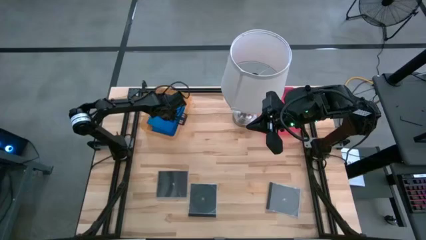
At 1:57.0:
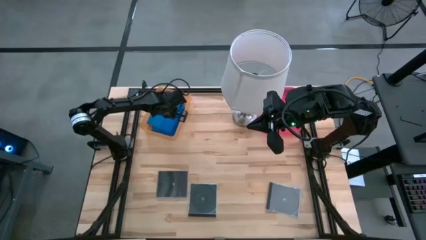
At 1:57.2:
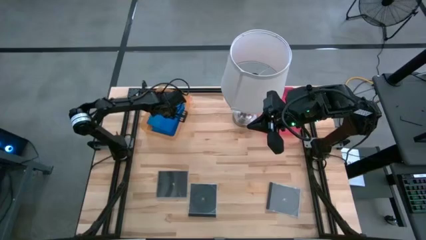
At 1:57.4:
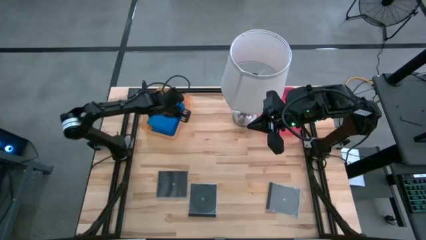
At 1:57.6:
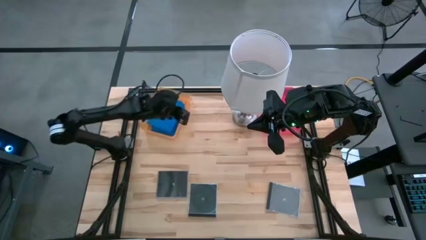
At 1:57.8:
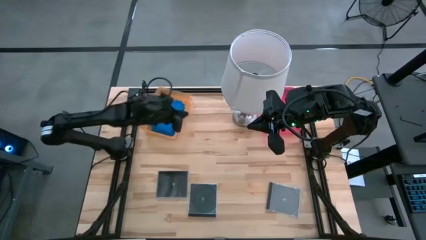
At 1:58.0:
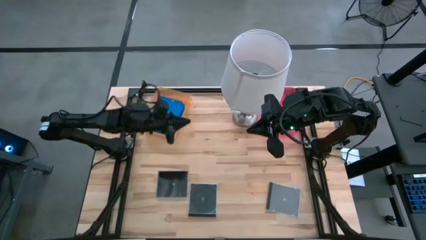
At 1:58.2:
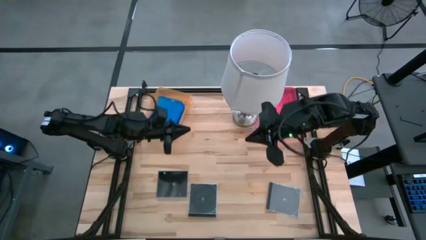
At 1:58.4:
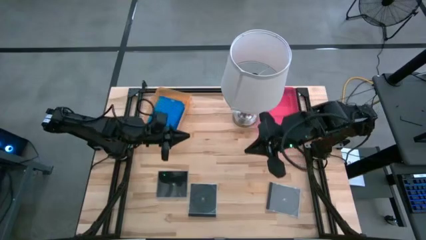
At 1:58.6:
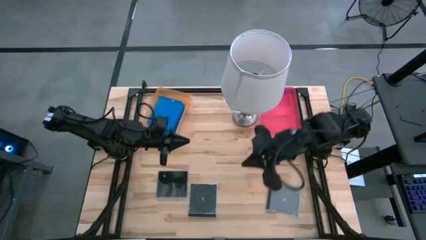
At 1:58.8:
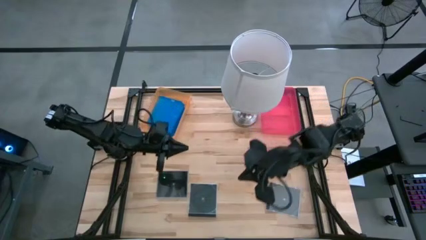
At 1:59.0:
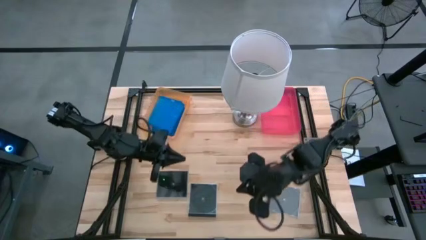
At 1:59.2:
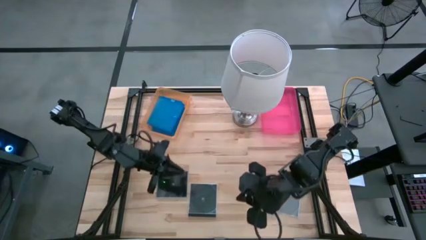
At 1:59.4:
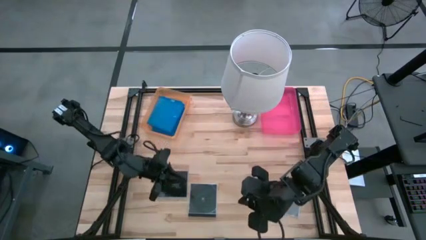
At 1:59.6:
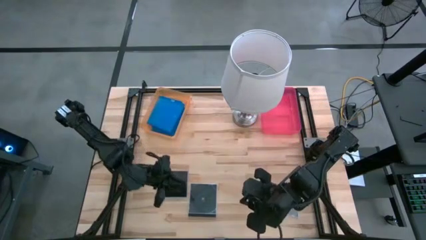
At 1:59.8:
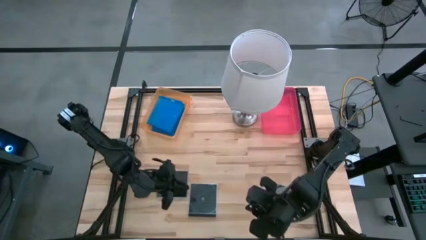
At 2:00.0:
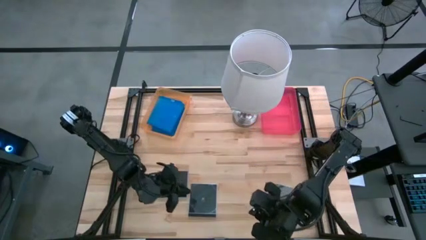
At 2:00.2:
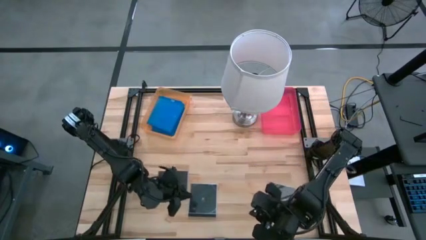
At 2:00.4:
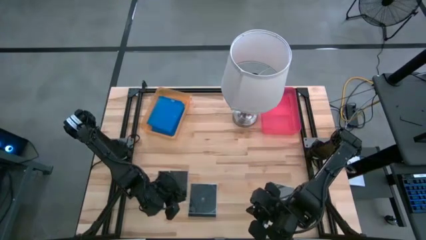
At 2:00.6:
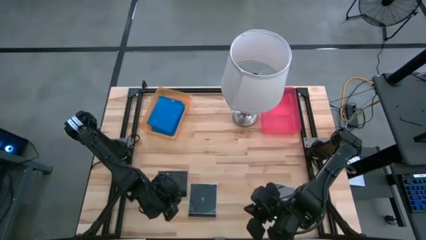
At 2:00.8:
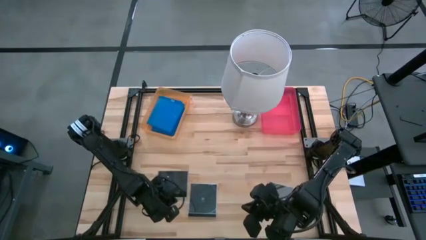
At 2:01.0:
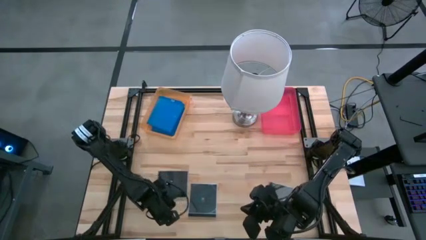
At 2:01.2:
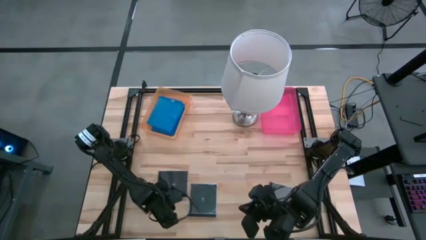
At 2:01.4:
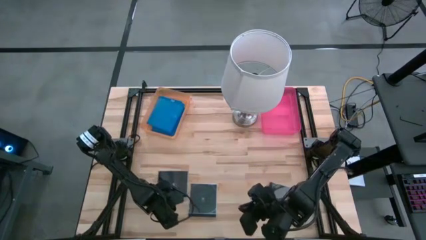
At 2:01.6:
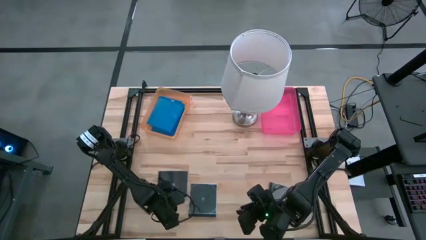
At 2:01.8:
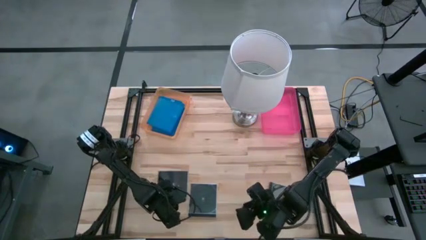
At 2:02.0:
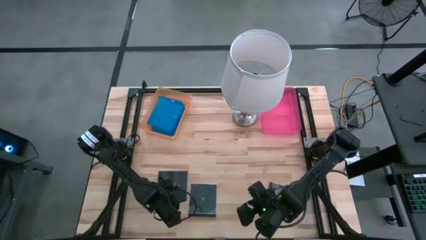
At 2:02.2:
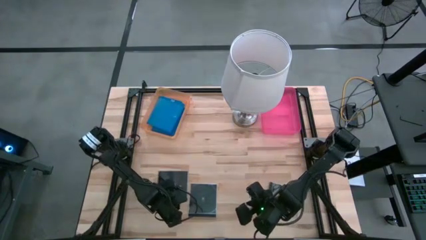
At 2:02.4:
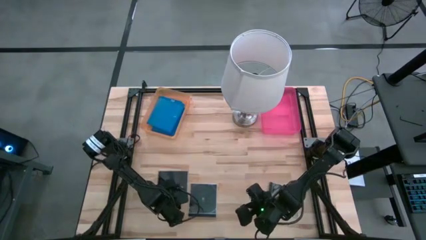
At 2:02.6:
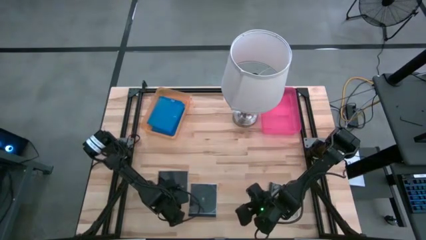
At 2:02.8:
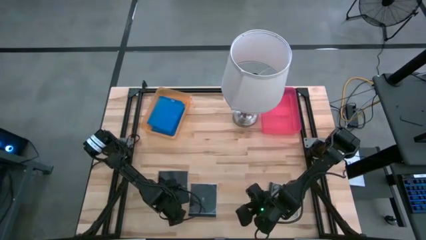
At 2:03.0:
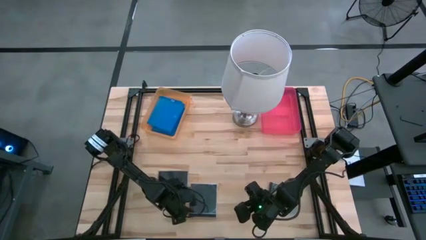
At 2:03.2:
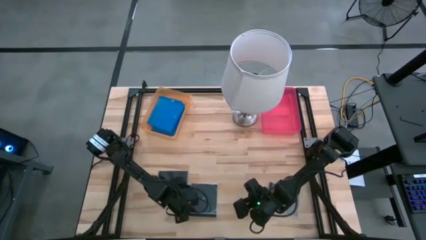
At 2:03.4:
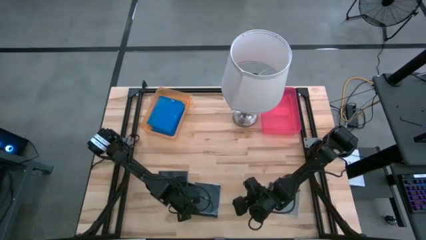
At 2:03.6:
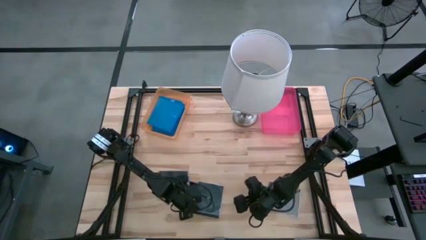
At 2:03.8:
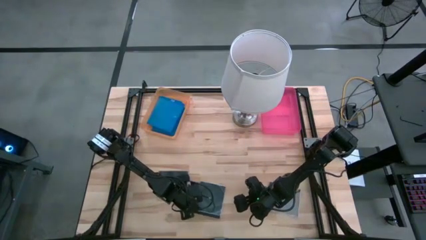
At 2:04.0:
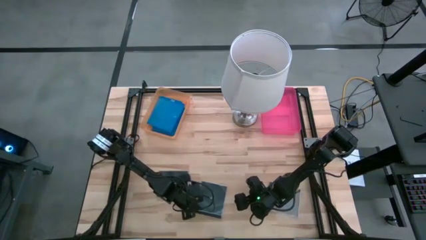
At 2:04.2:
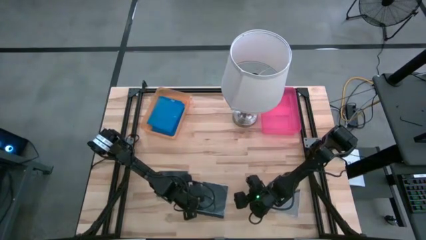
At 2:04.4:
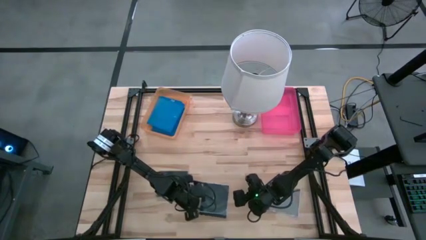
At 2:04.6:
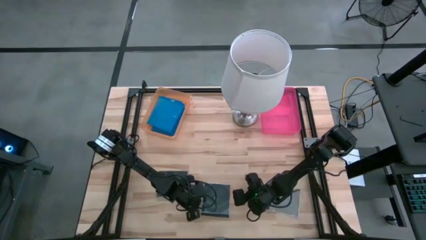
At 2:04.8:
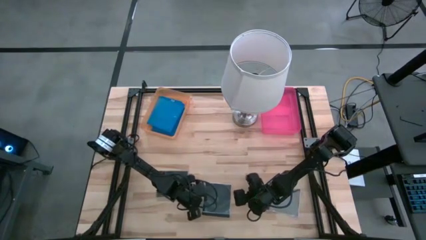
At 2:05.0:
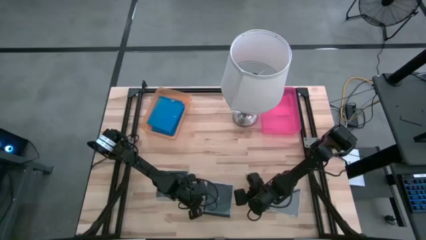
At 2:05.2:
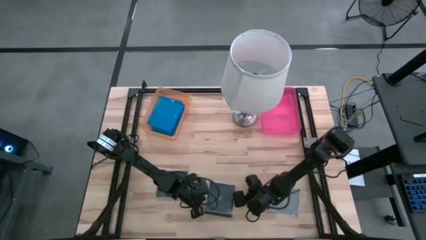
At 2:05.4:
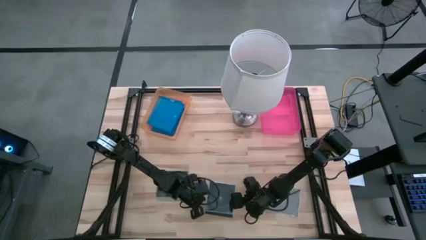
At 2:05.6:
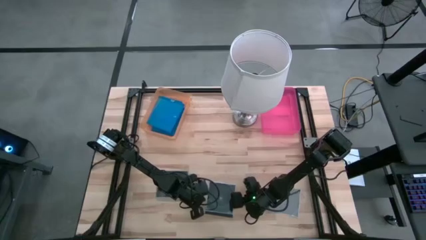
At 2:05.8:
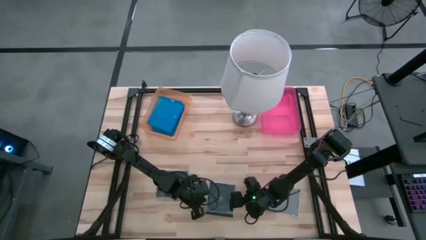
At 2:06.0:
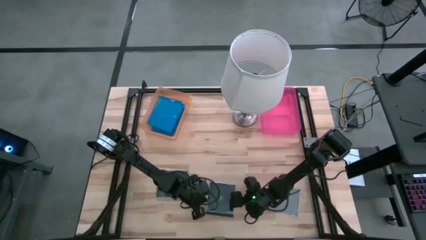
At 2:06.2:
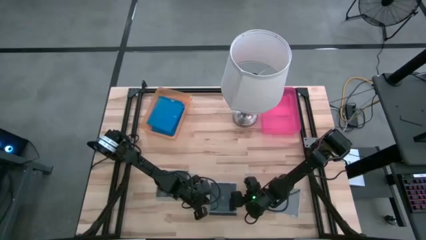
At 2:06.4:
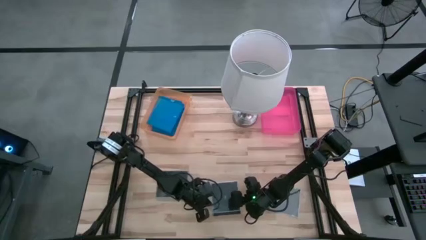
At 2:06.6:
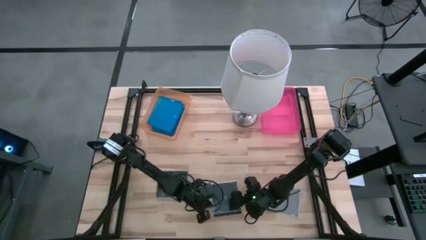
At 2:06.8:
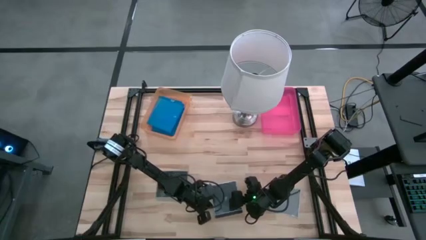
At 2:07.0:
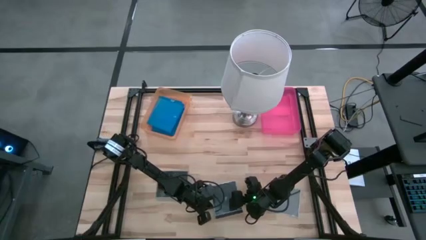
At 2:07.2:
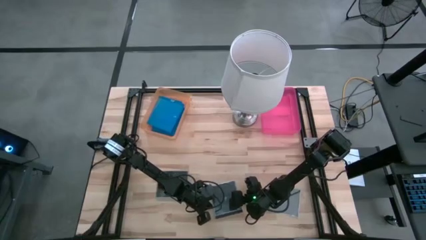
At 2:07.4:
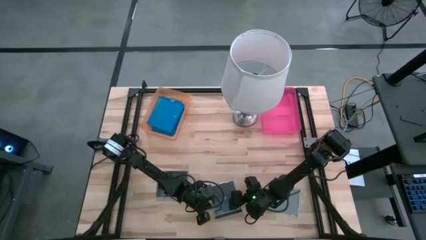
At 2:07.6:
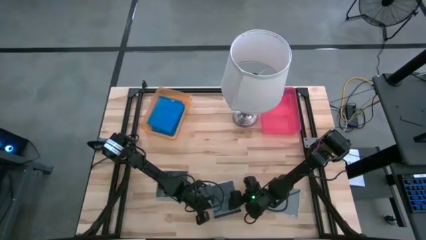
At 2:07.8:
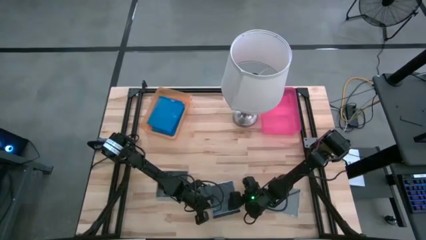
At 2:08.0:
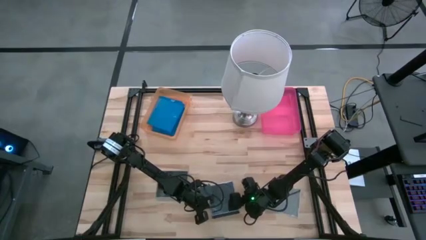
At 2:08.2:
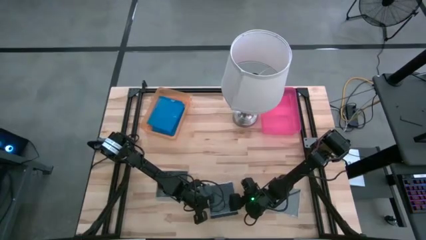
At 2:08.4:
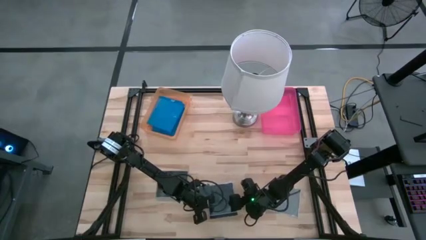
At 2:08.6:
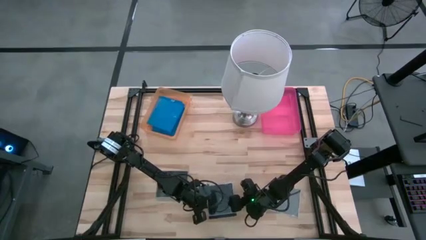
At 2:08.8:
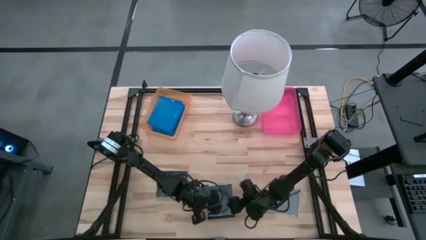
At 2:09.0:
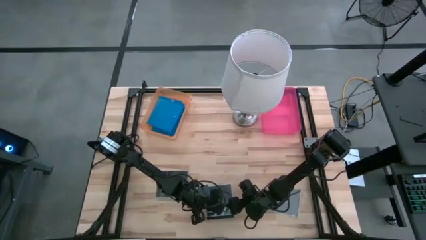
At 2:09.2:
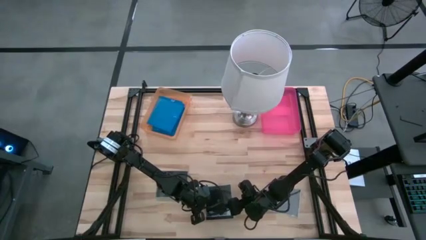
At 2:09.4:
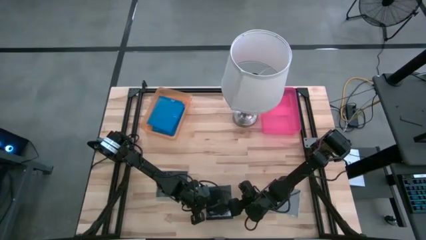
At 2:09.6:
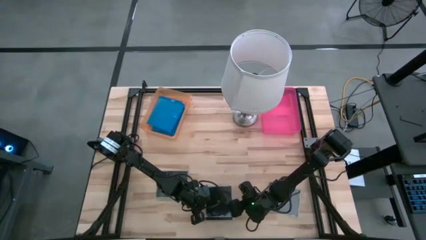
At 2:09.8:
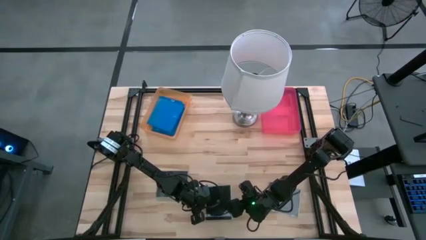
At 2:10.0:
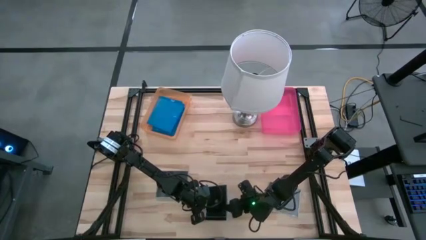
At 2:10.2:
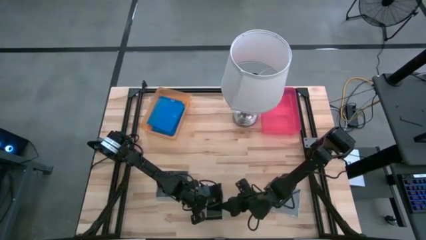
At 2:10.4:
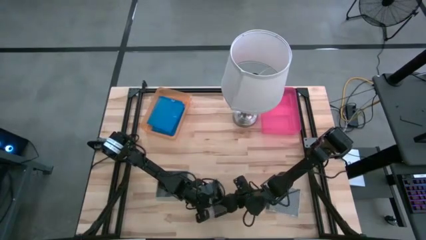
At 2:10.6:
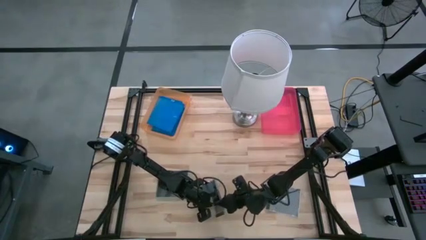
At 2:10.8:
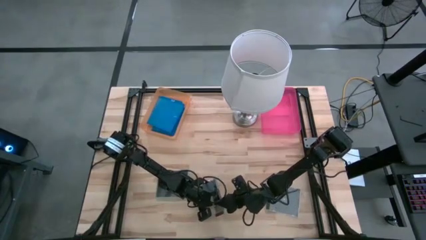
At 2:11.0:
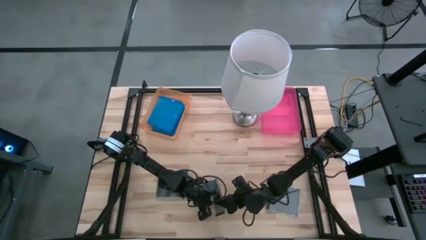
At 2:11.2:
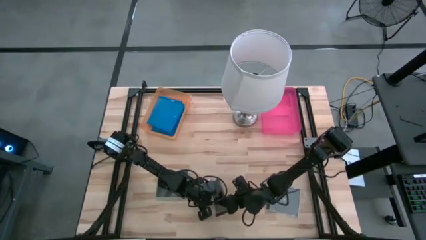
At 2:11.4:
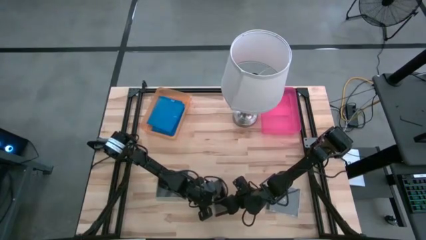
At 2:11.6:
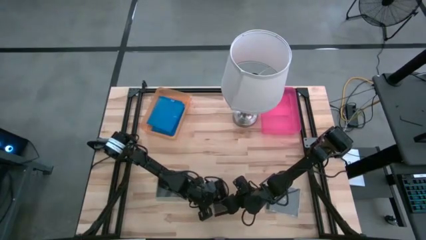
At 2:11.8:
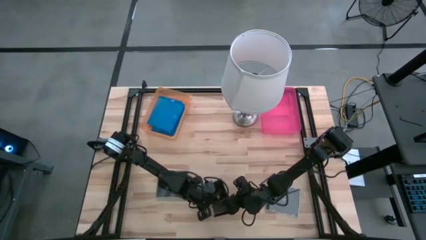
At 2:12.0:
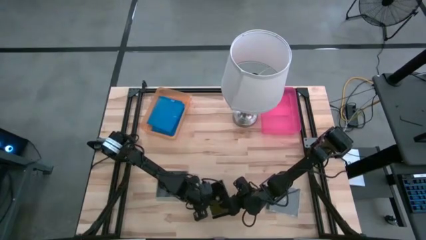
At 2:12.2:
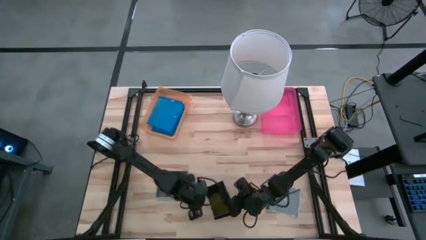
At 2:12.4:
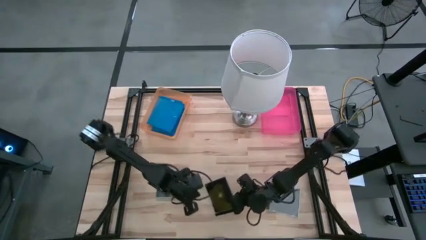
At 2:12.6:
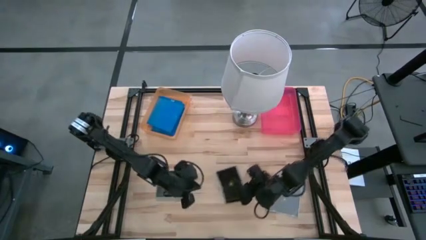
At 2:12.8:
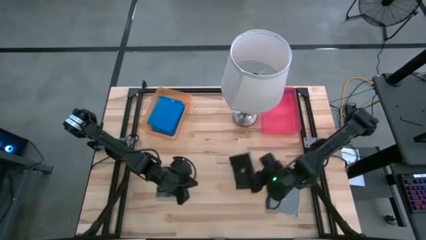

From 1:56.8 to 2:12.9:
Task: Pick & place jewel cases by type
Put the middle black cd case into the pink bin
